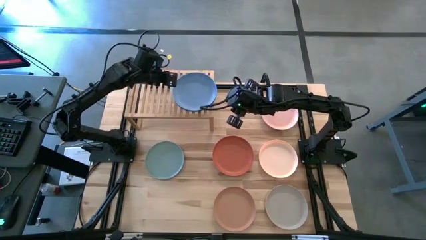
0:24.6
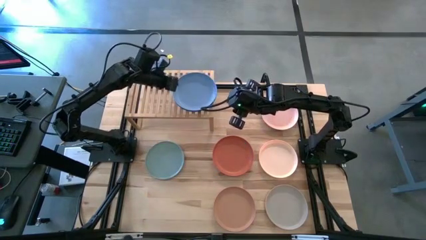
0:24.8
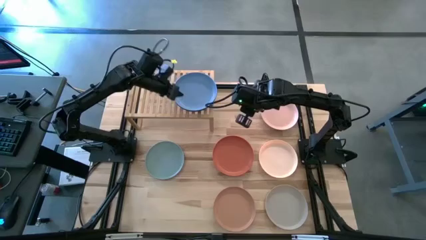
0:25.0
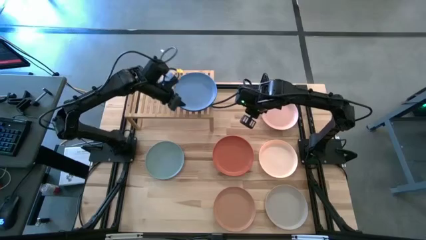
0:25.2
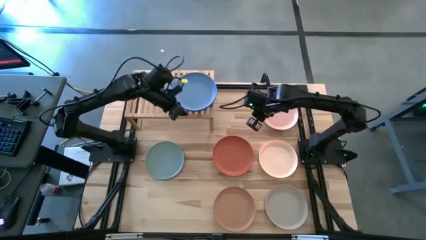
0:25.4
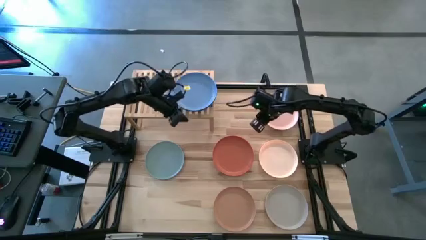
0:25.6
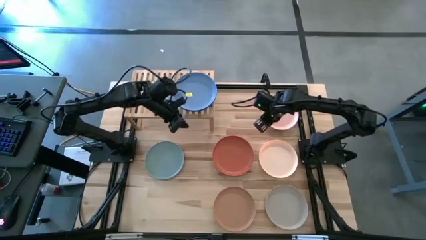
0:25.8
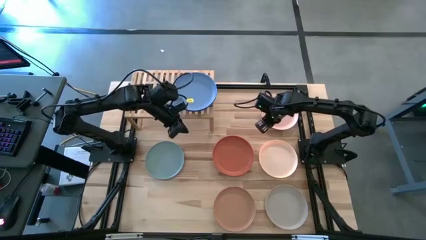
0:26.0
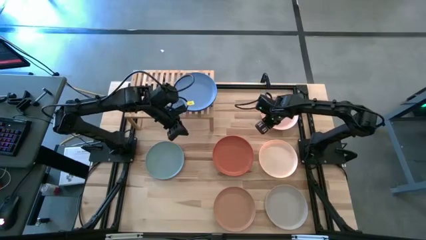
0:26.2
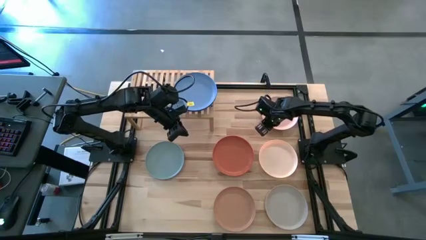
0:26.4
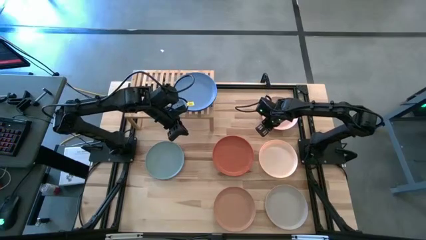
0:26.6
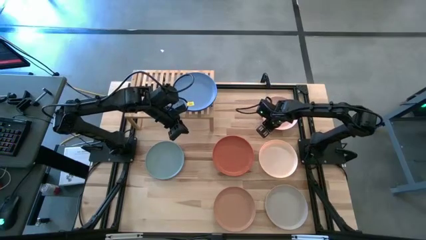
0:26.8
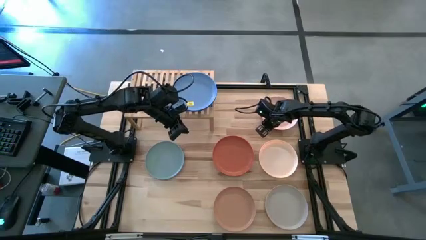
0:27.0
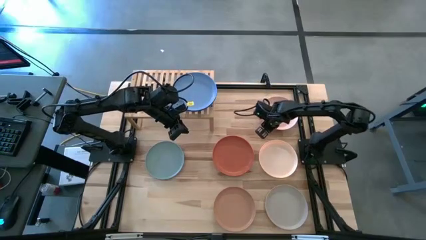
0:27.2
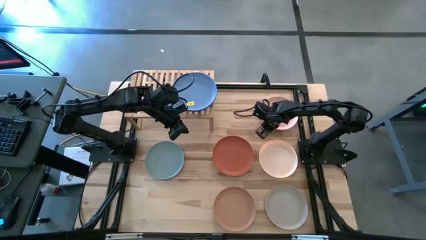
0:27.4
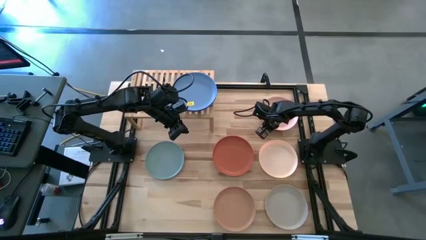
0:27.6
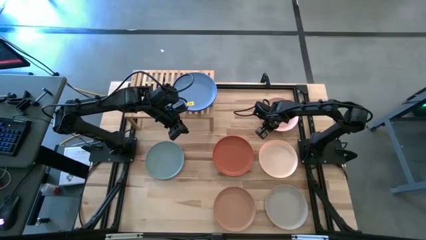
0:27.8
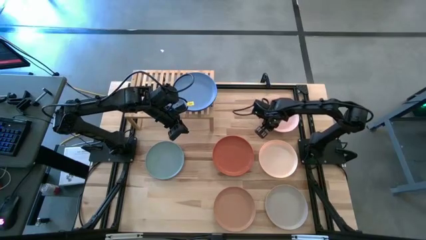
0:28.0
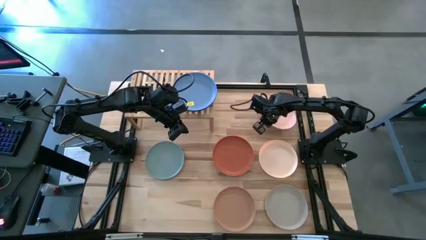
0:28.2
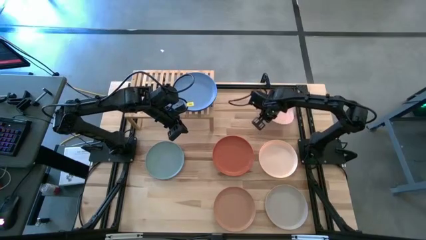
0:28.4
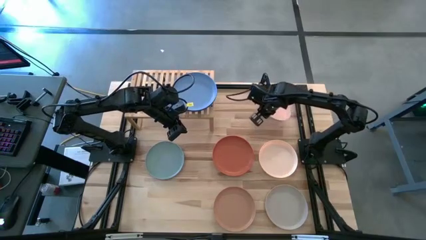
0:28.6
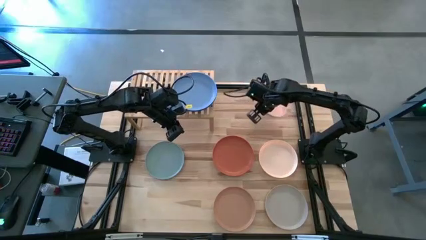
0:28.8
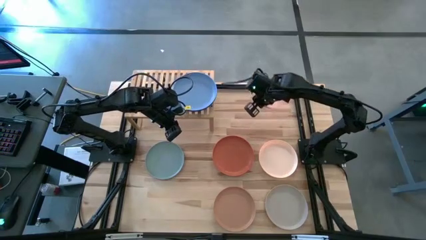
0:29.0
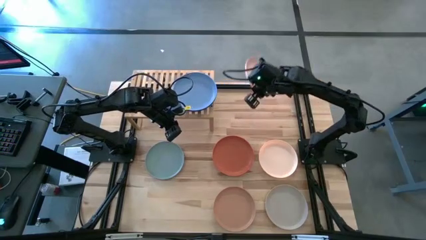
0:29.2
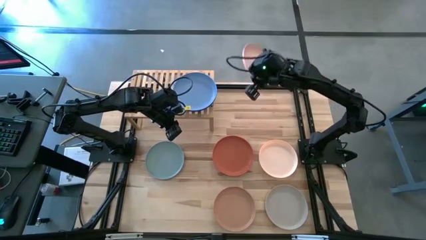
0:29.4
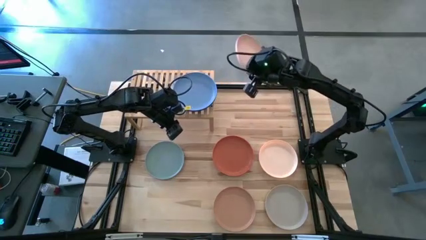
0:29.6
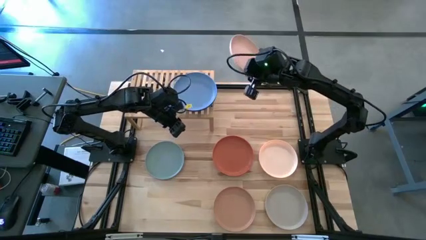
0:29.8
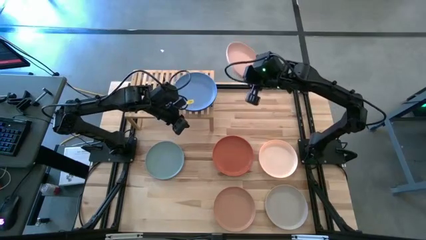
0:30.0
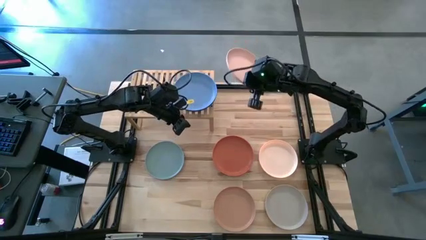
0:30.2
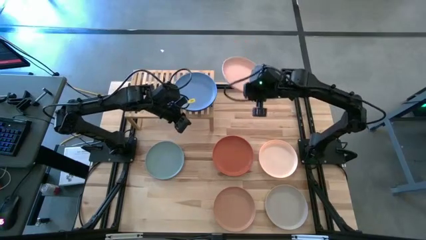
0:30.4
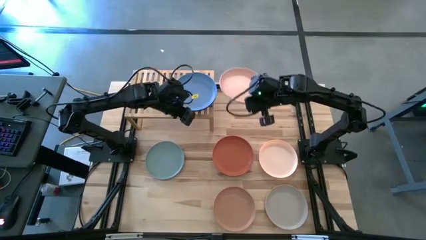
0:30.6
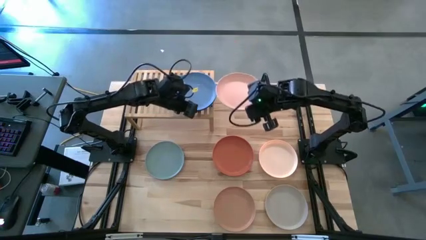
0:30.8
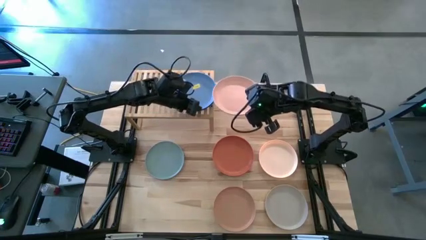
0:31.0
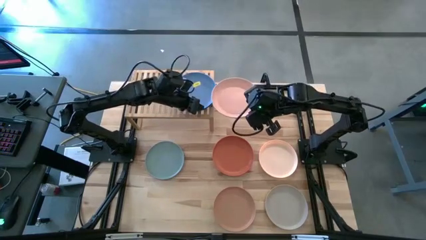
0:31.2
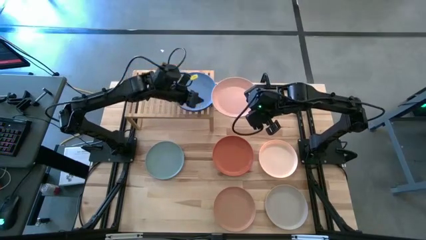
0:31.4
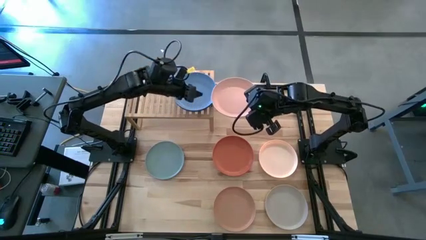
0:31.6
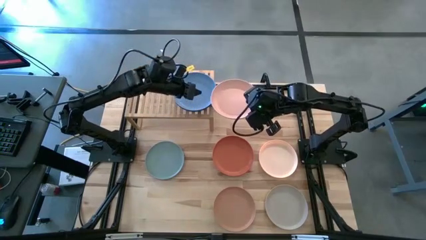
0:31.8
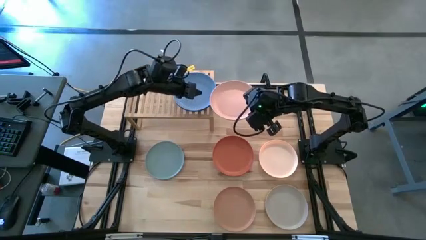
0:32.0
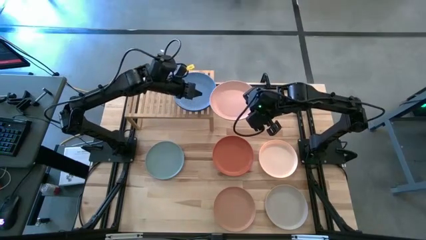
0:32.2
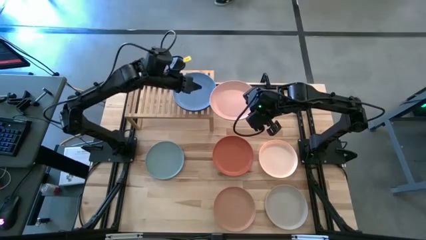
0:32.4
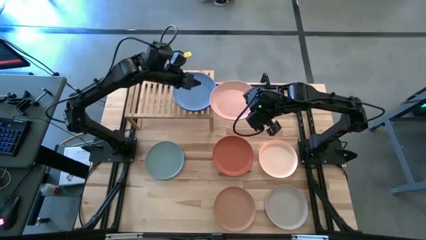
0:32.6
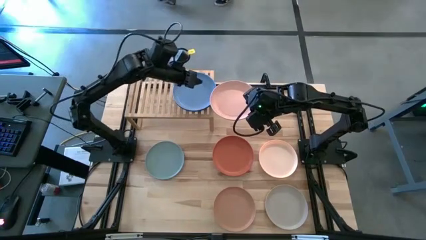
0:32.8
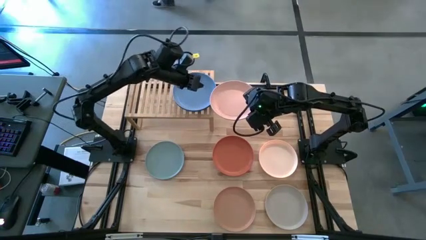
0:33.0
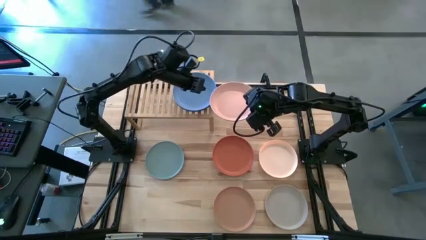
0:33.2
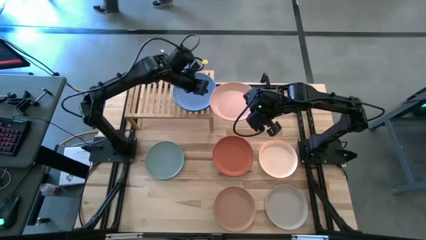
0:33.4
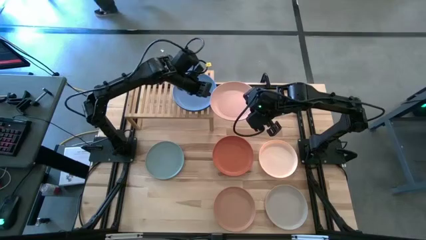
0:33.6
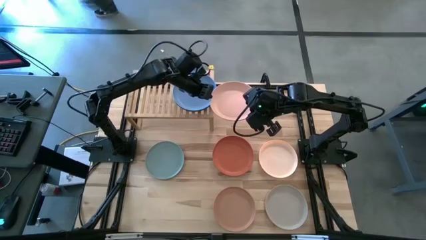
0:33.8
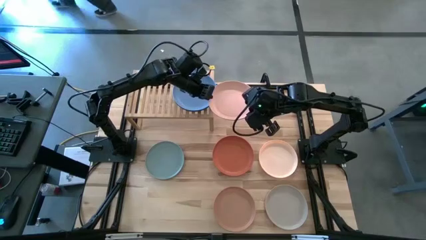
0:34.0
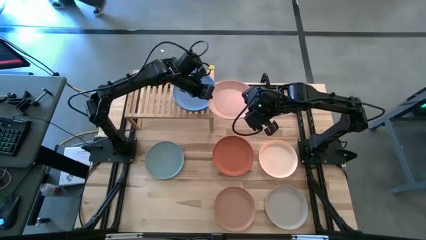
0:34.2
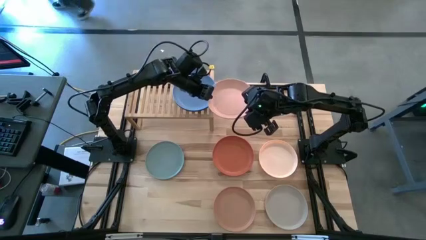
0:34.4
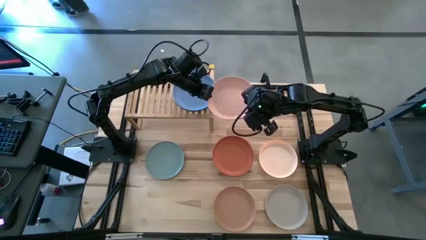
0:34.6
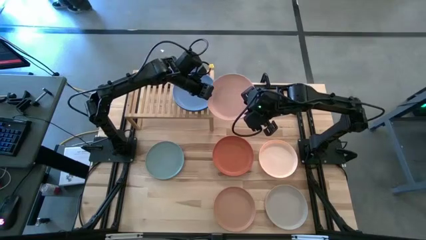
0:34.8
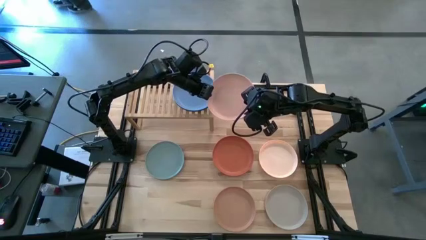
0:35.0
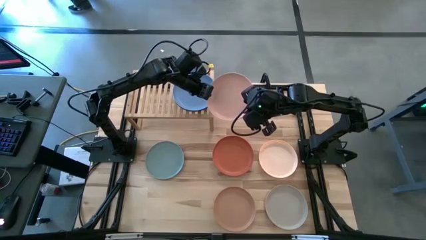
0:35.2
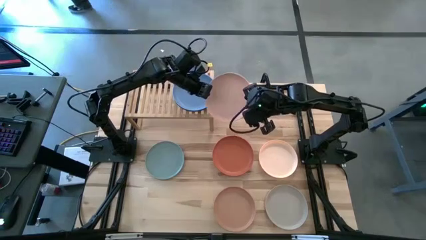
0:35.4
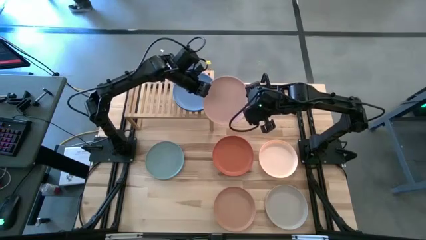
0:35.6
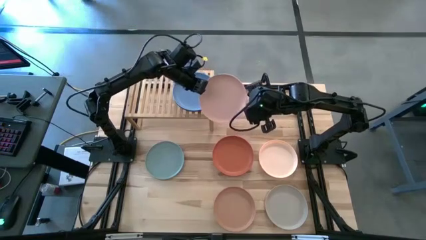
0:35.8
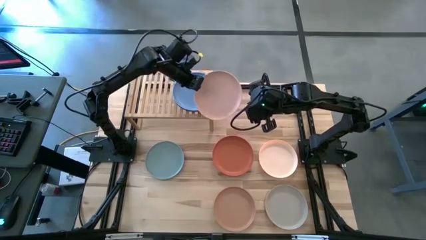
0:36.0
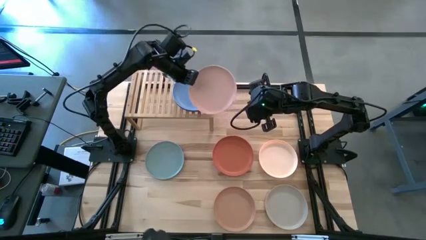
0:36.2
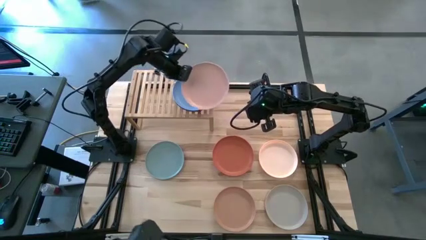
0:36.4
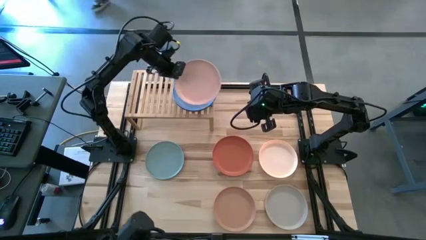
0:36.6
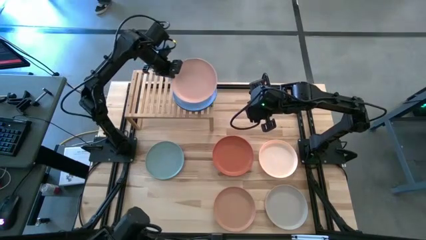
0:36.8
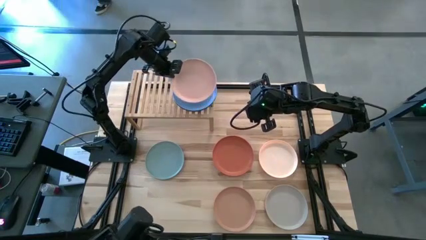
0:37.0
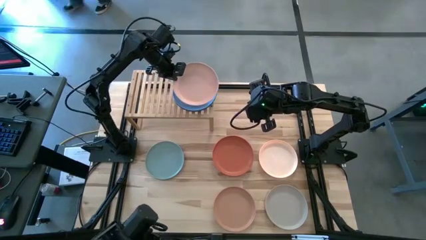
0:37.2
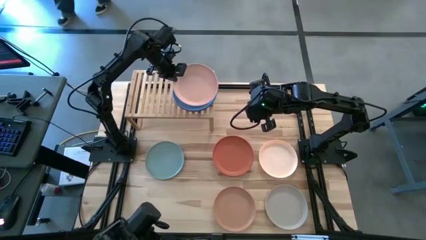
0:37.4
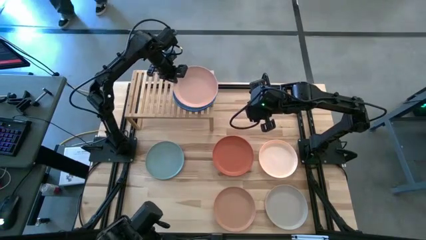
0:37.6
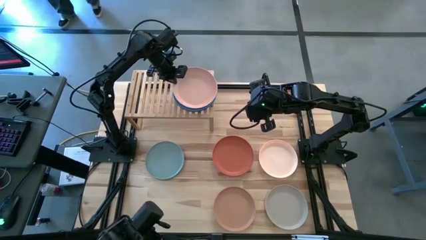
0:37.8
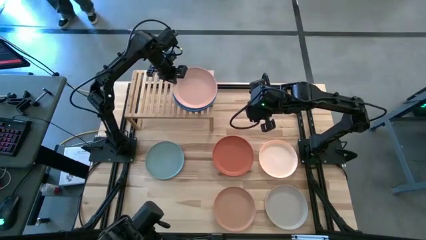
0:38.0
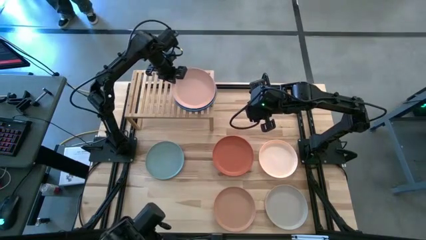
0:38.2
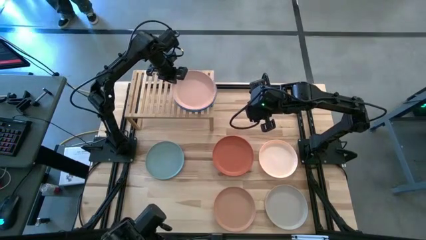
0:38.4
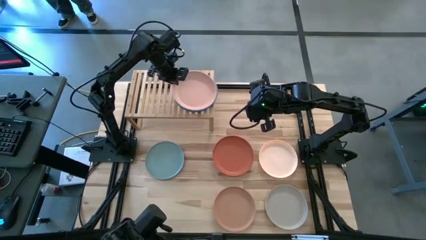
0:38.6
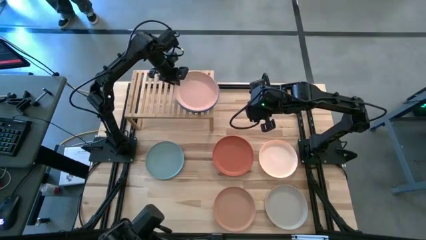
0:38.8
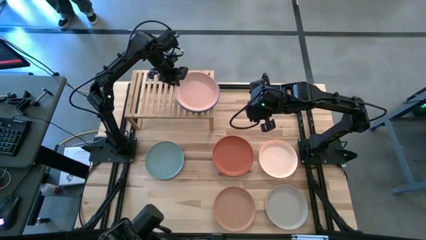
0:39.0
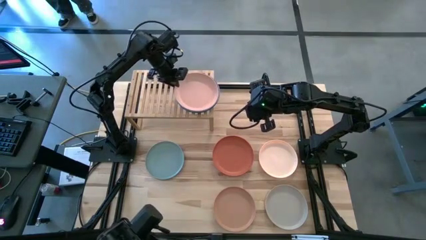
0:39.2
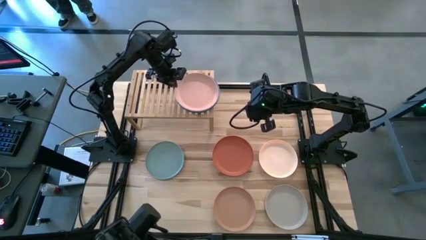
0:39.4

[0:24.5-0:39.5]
Task: Place and stack plates onto a shelf
Stack the top light orange plate on top of the blue plate on the shelf
